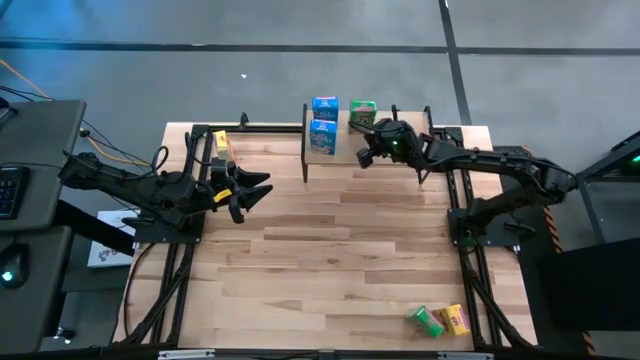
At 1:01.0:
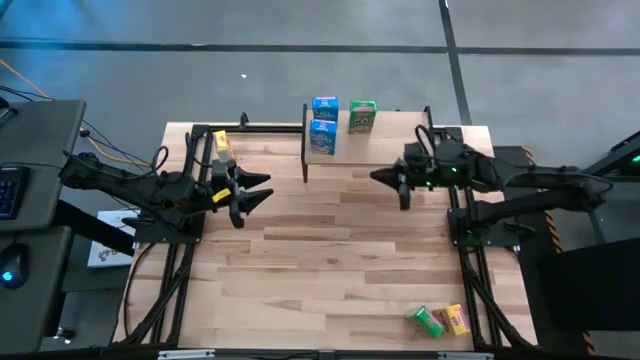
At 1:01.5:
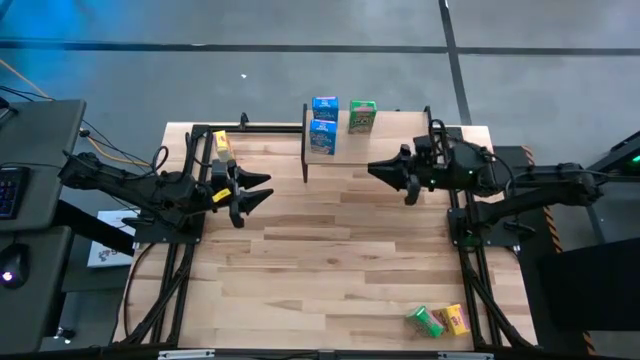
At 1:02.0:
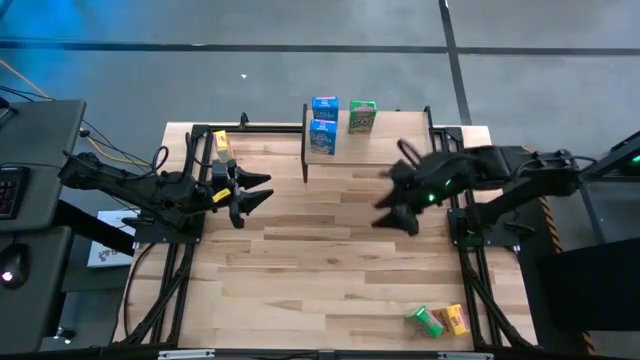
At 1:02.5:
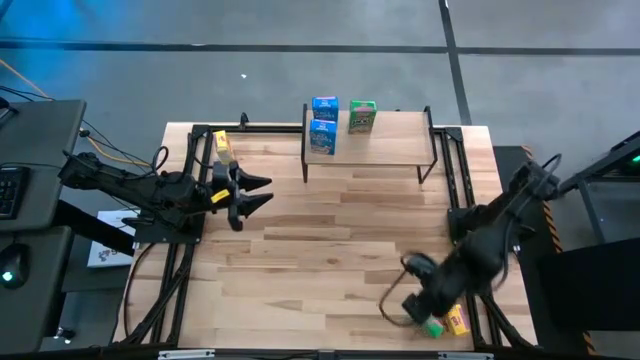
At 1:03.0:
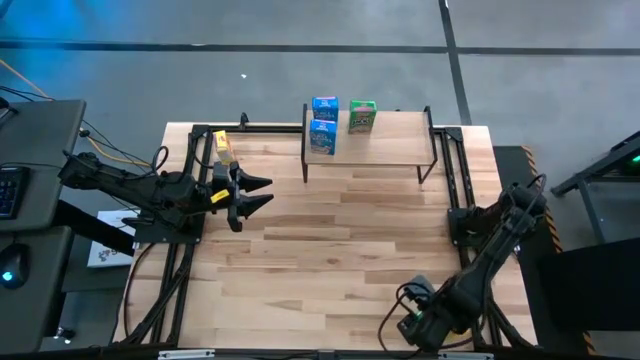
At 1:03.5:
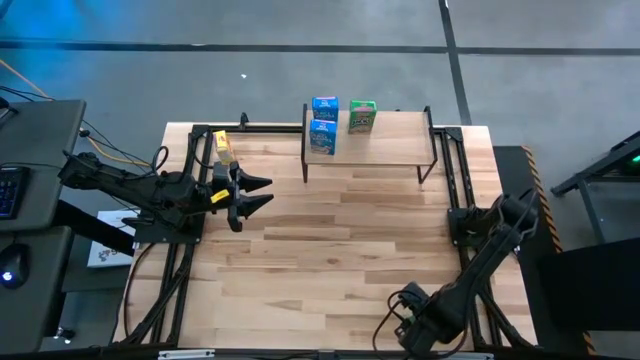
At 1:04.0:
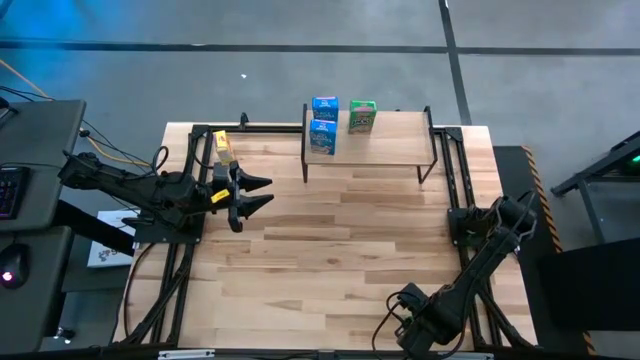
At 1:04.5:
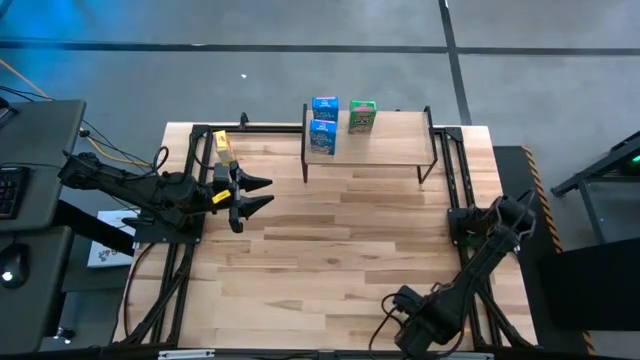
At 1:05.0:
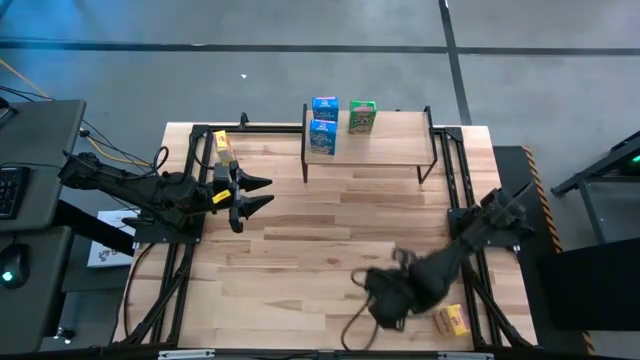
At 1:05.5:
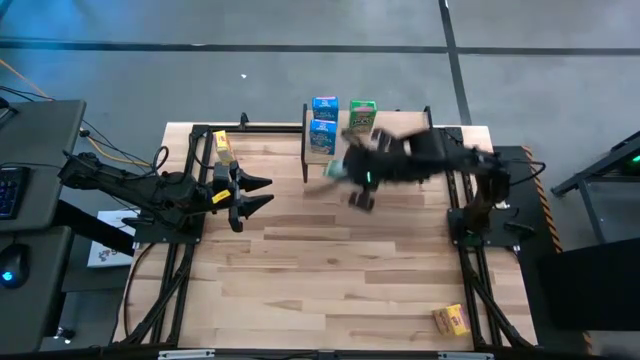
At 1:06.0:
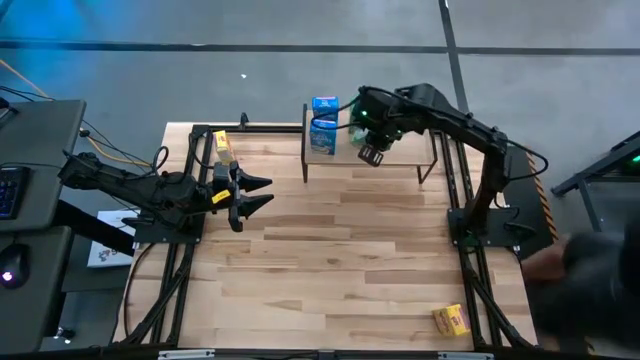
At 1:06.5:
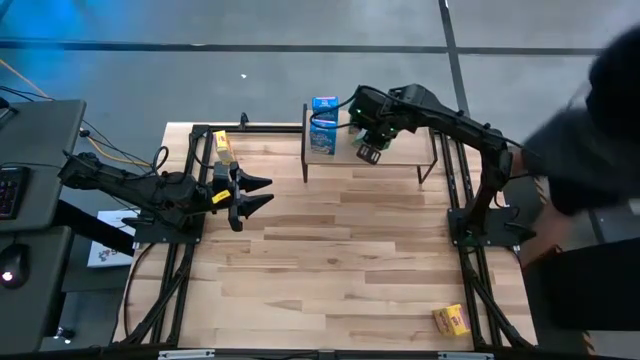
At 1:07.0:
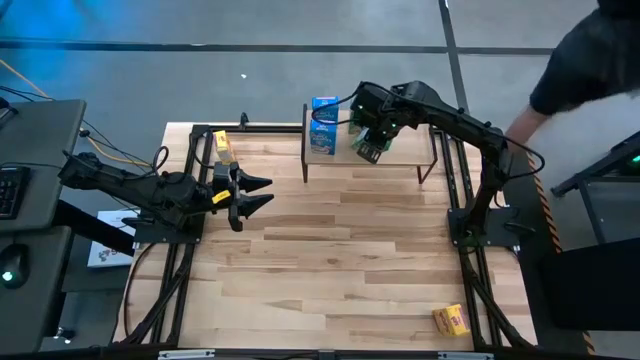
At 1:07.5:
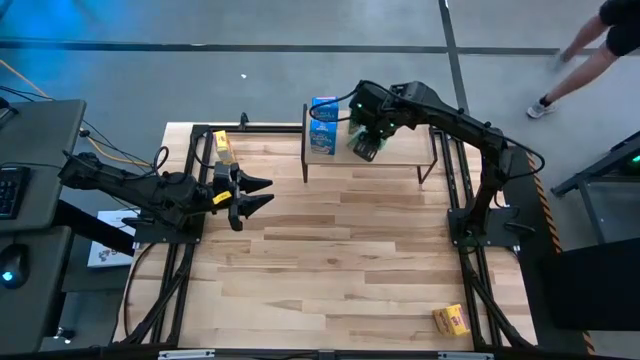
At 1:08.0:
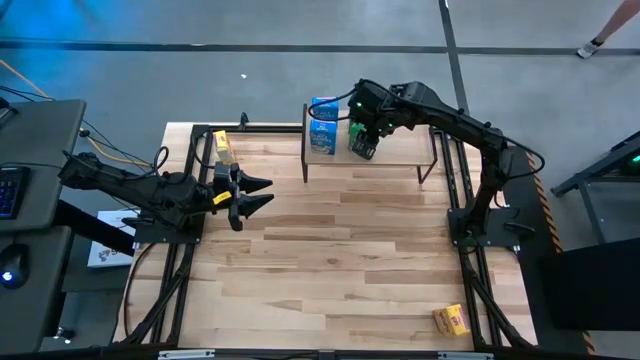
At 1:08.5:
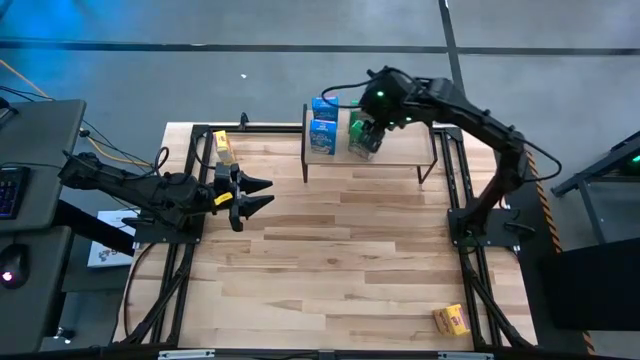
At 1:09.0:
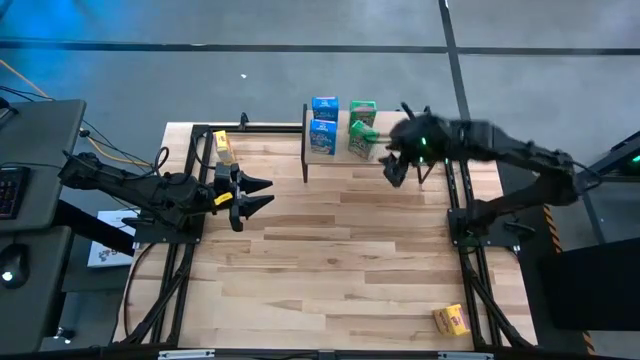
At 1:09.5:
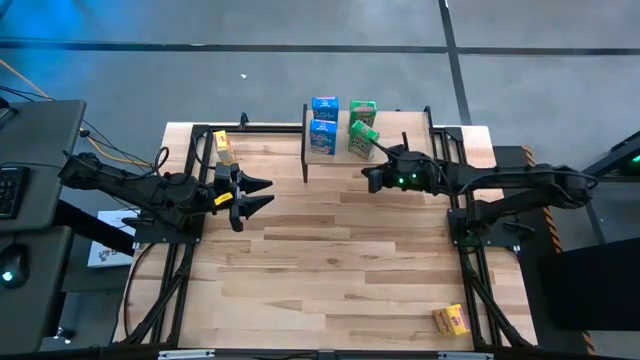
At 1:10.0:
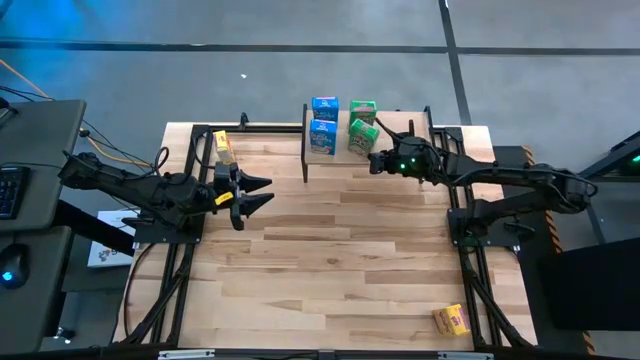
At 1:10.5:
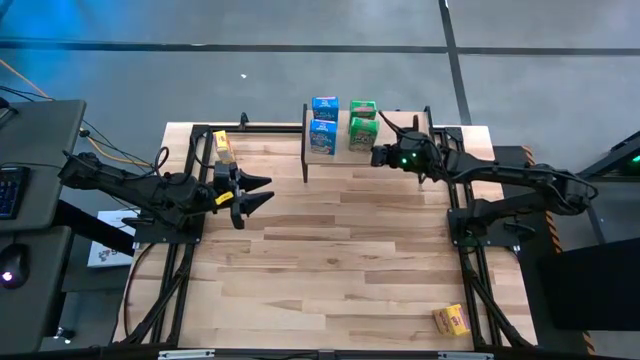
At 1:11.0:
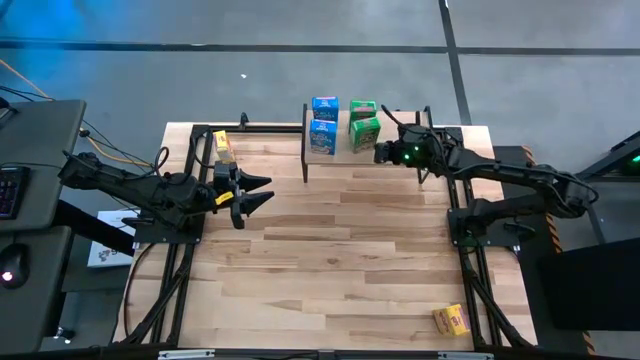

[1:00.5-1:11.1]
Task: Stack cereal on shelf
Put the green cereal box on the shelf

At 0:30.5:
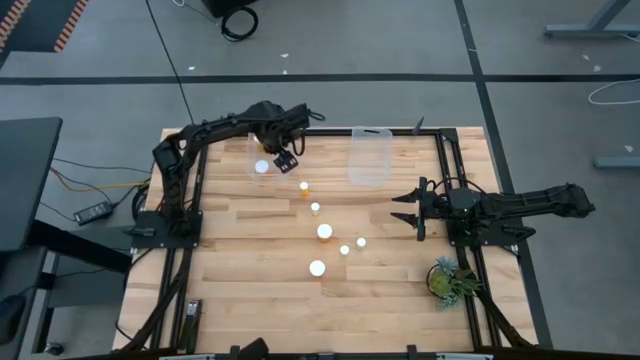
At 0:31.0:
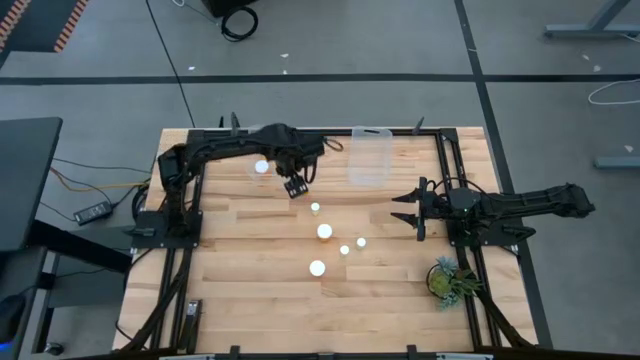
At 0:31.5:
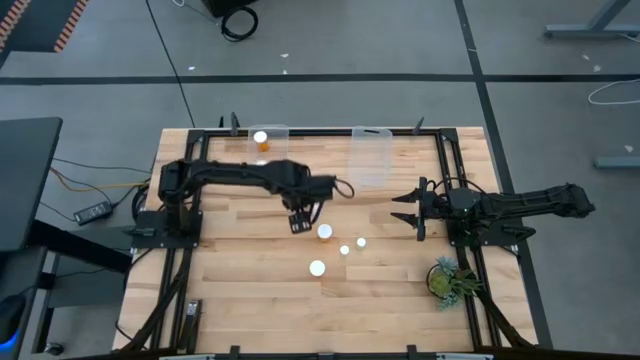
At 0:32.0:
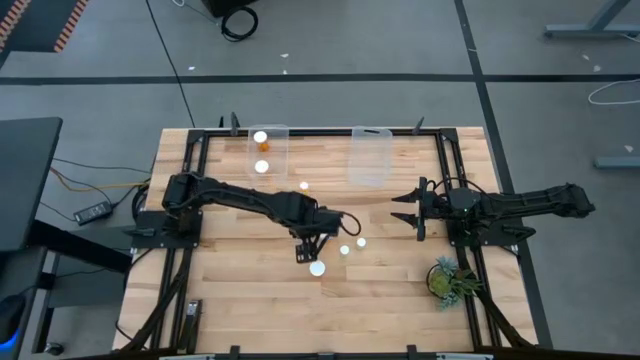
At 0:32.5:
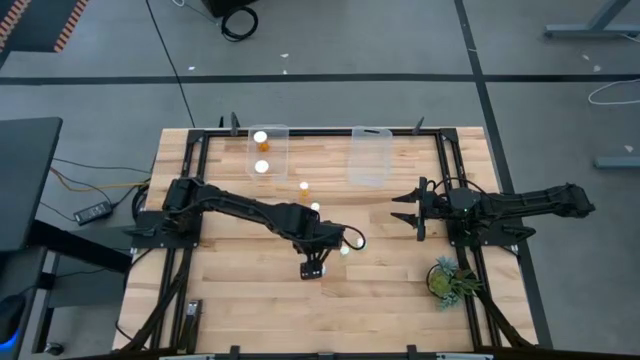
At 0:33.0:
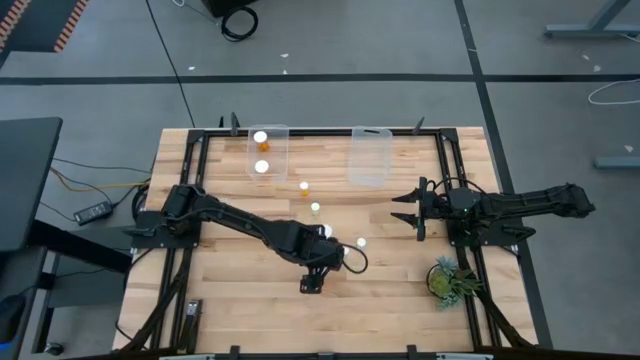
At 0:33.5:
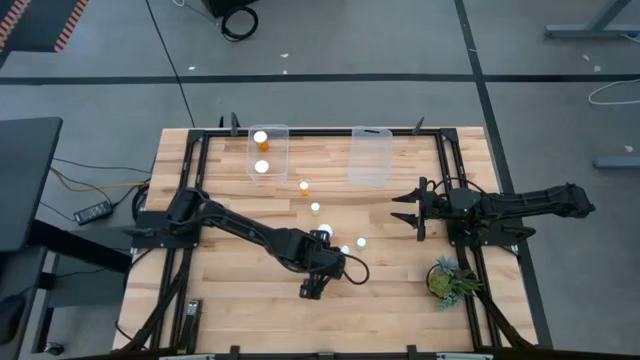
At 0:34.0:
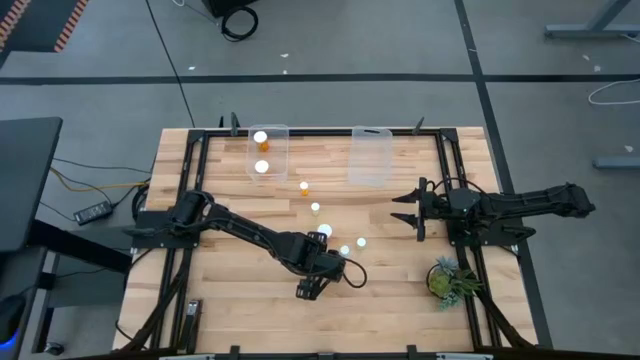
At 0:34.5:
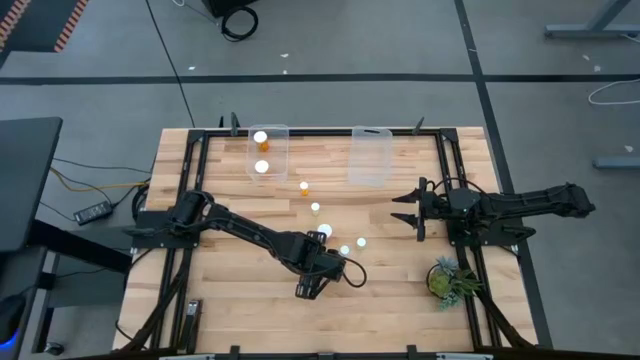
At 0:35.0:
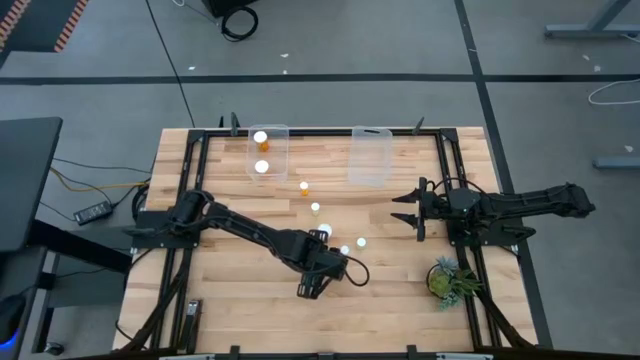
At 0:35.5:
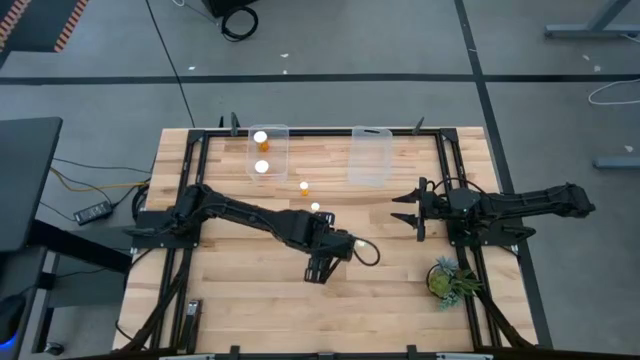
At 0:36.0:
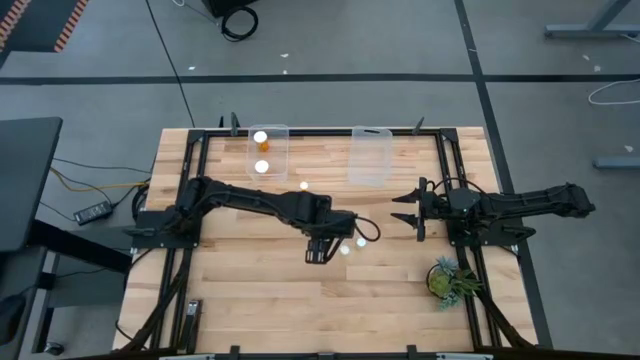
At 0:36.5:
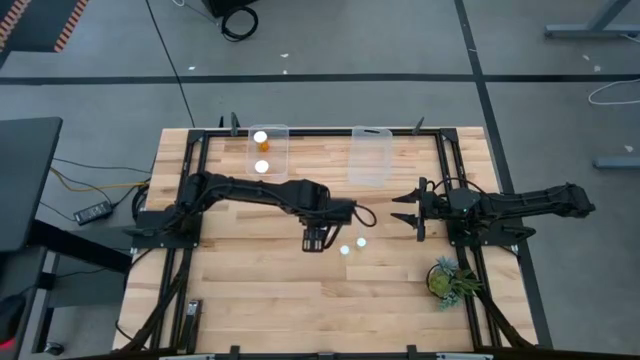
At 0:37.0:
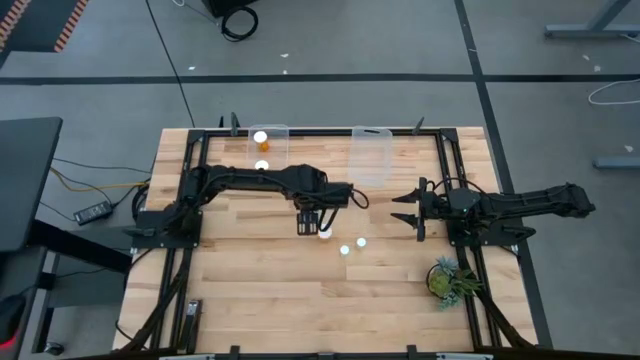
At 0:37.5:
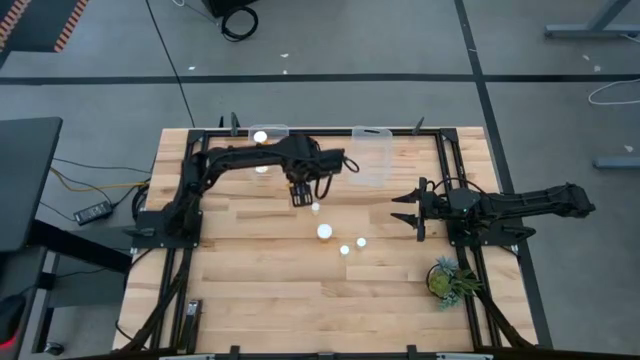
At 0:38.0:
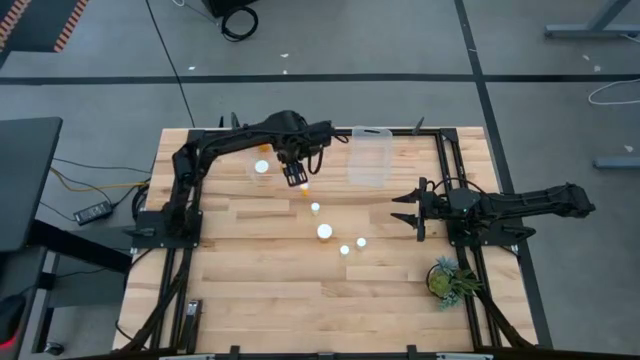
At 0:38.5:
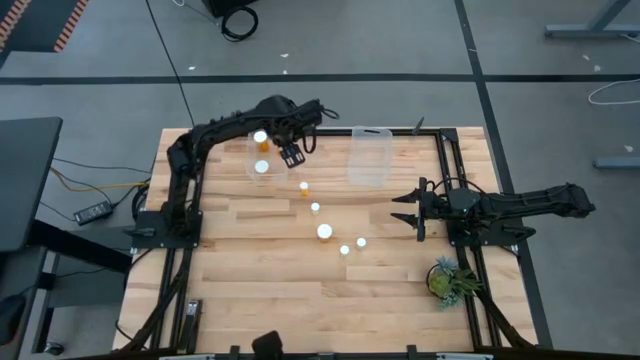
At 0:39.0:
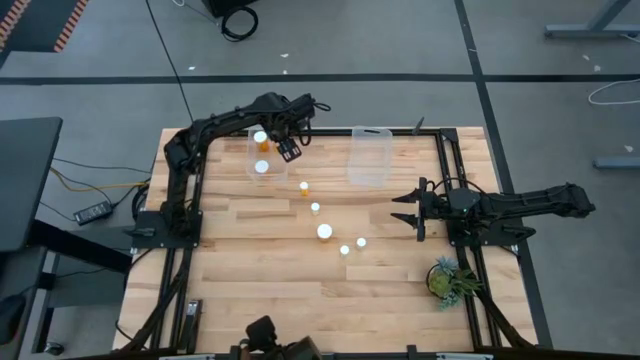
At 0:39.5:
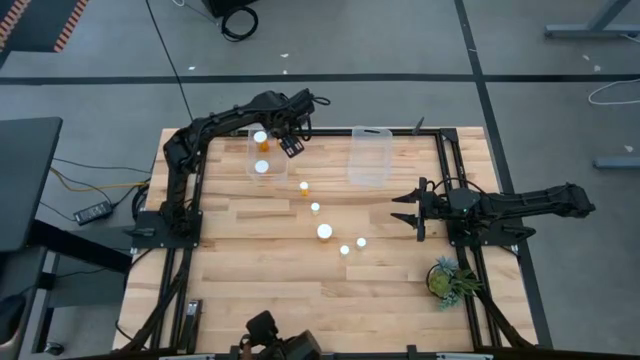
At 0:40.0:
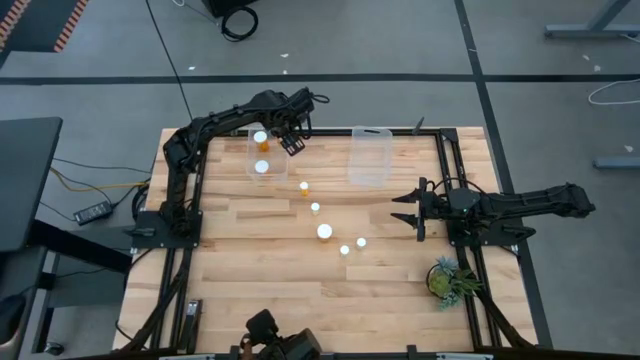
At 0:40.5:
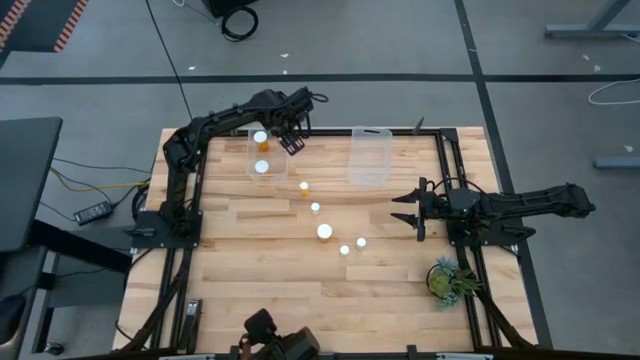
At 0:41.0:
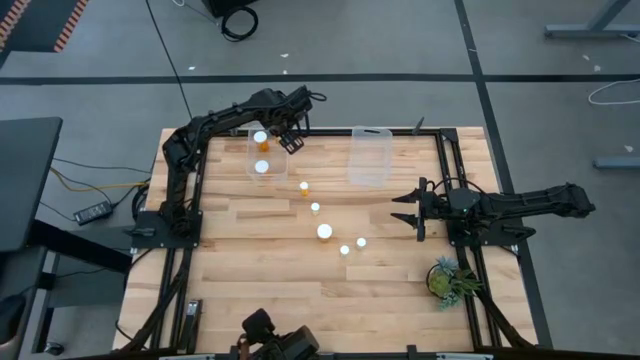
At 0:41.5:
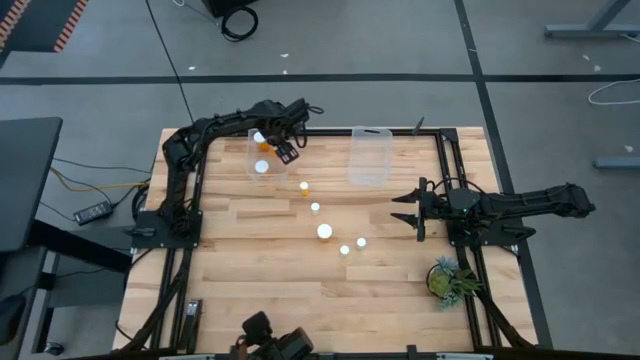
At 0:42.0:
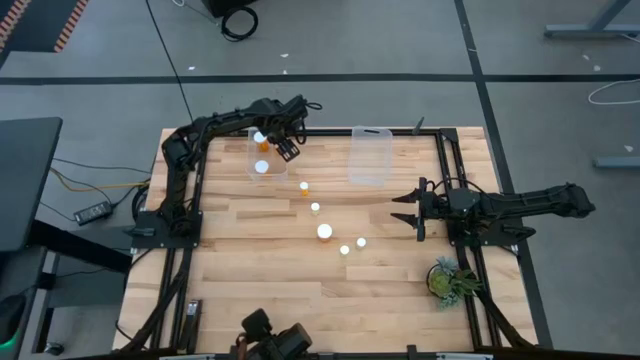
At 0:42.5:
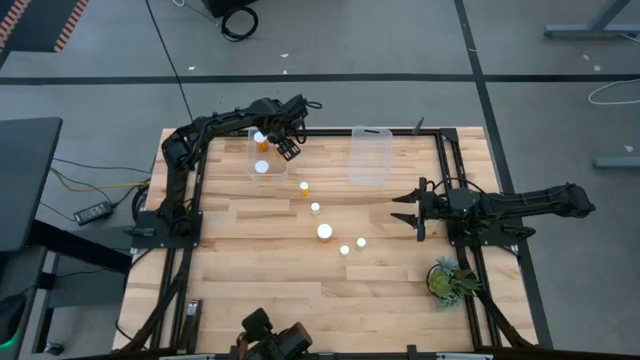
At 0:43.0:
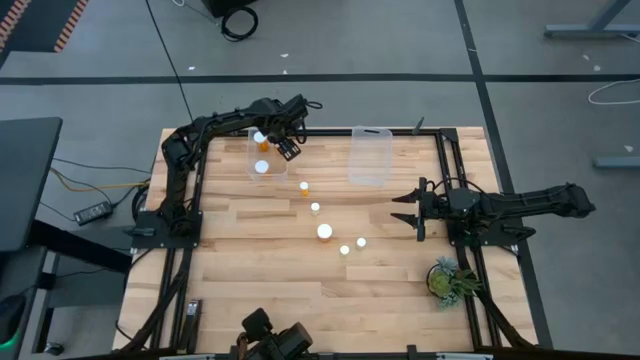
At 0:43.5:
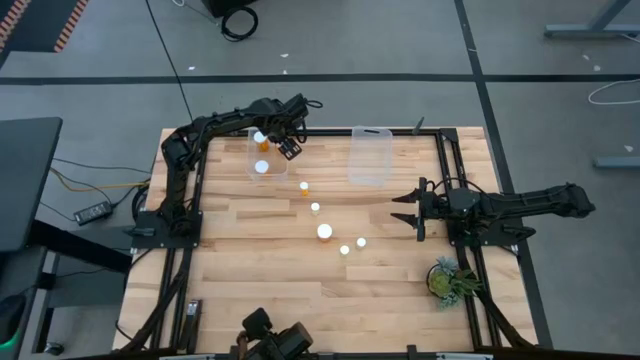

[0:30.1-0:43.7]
Task: Pick and place medicine bottles into bin by pill shape (circle, oval)
Put the orange capsule bottle into the left transparent bin
